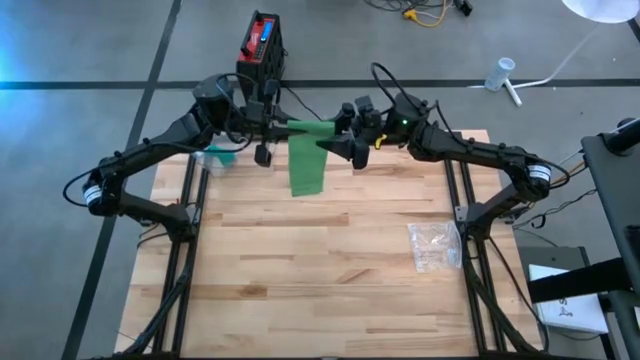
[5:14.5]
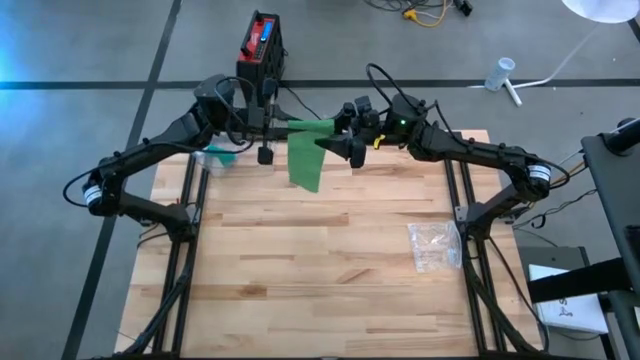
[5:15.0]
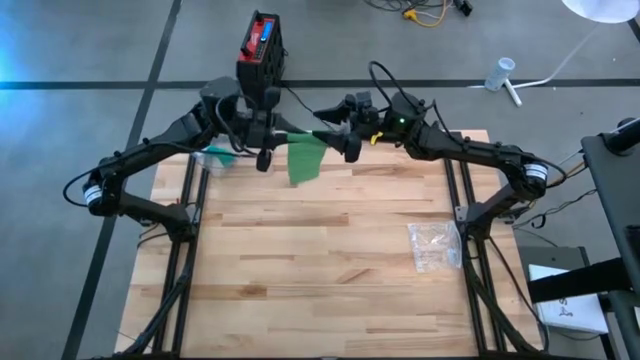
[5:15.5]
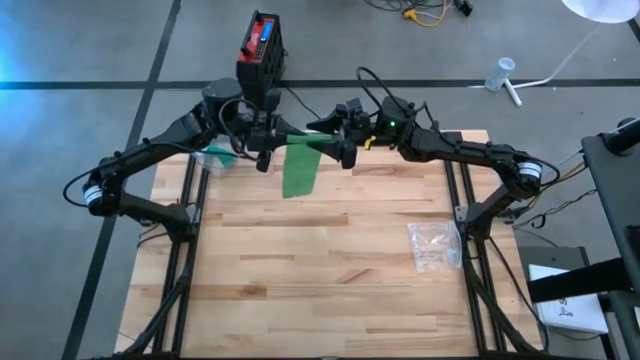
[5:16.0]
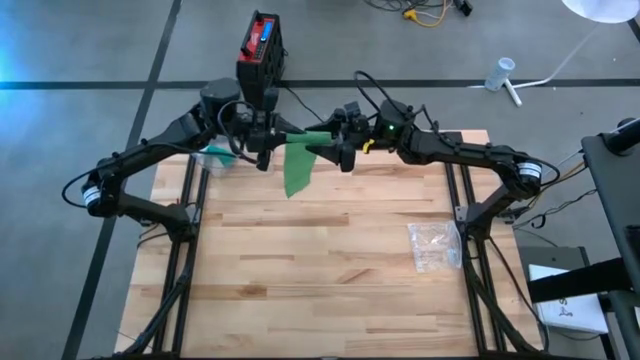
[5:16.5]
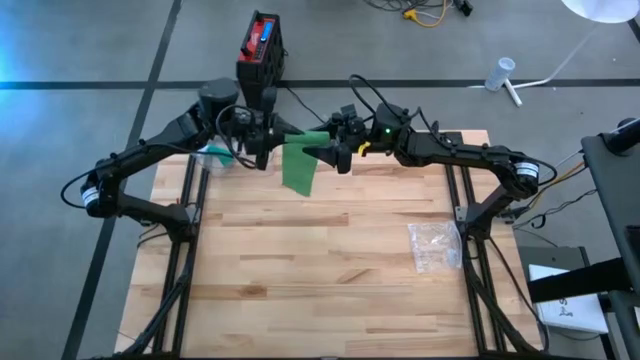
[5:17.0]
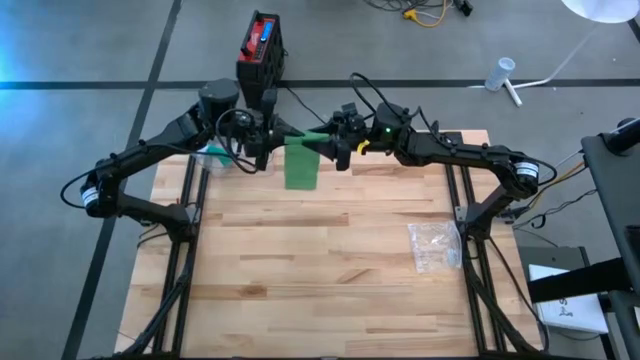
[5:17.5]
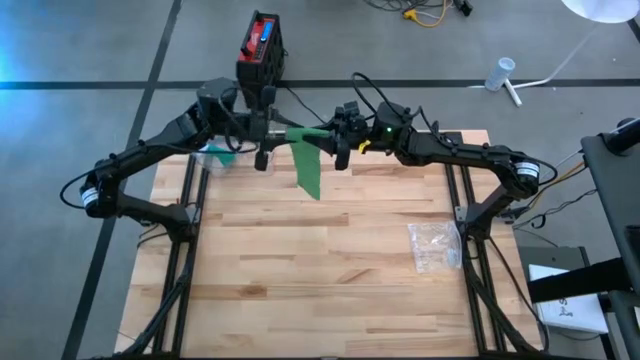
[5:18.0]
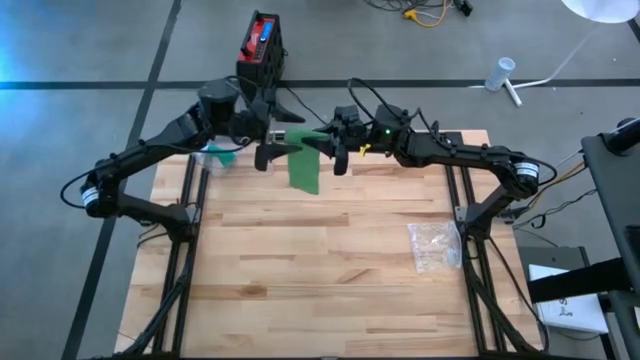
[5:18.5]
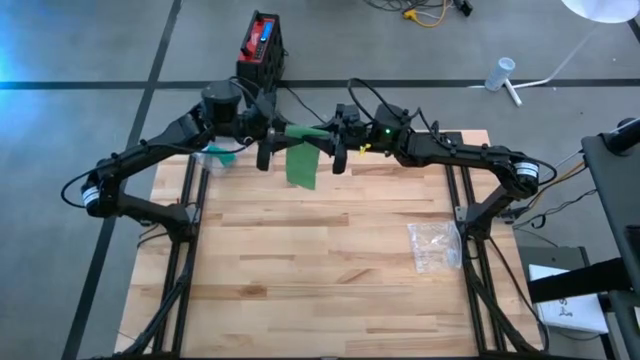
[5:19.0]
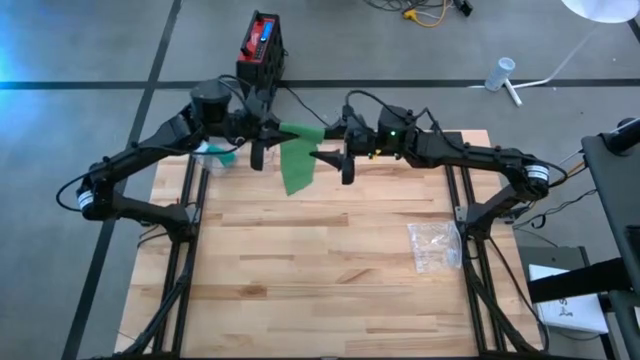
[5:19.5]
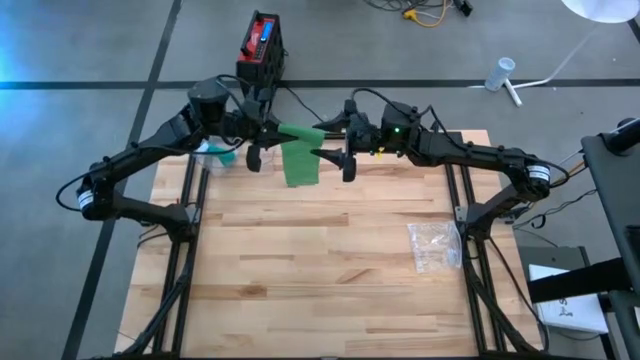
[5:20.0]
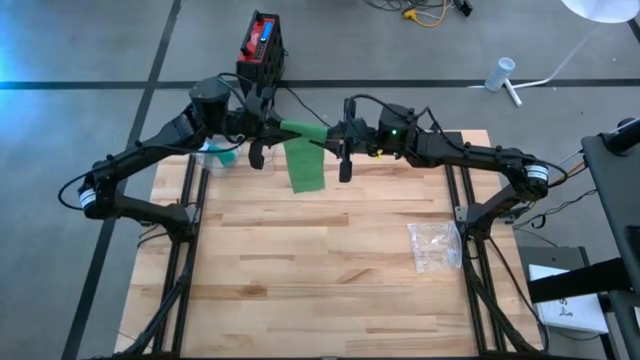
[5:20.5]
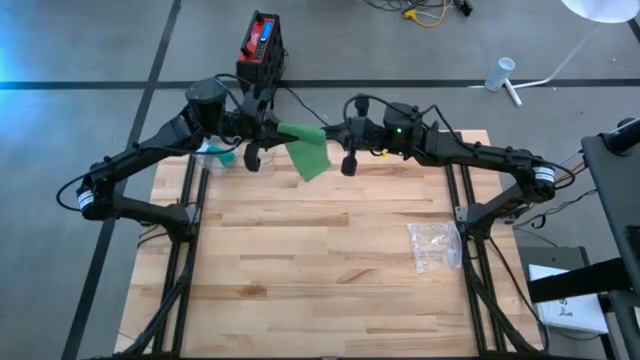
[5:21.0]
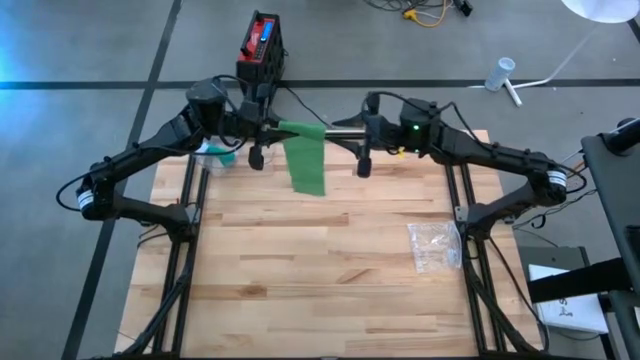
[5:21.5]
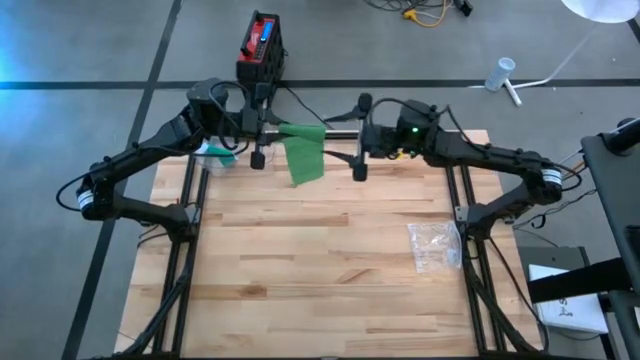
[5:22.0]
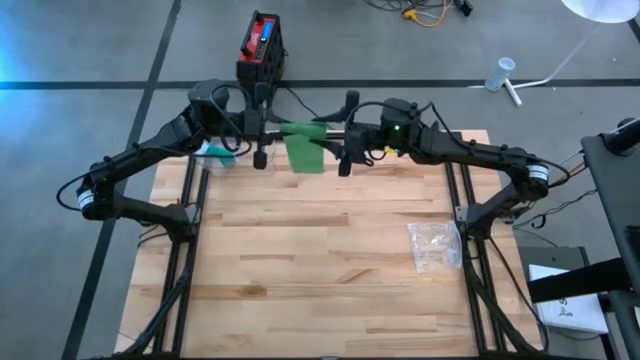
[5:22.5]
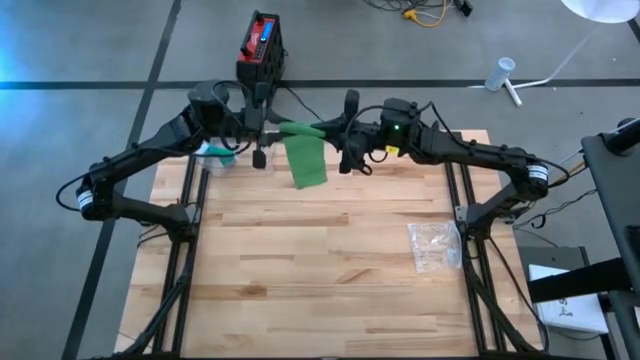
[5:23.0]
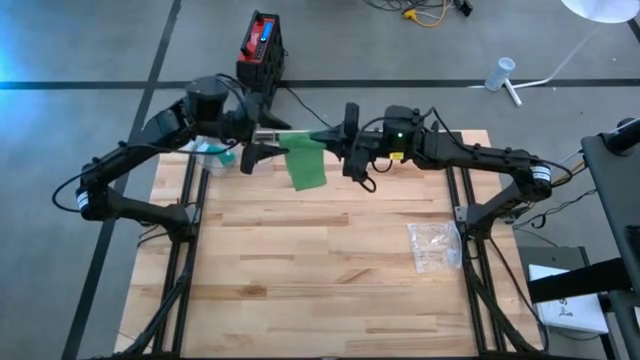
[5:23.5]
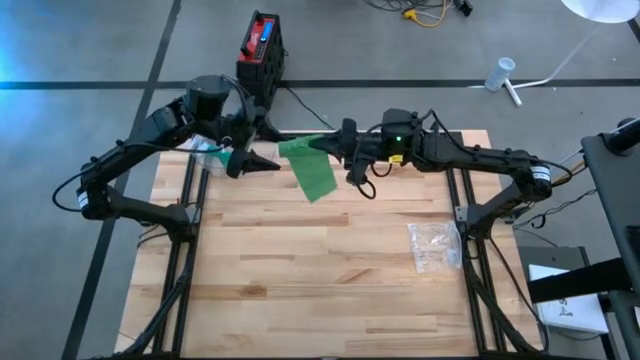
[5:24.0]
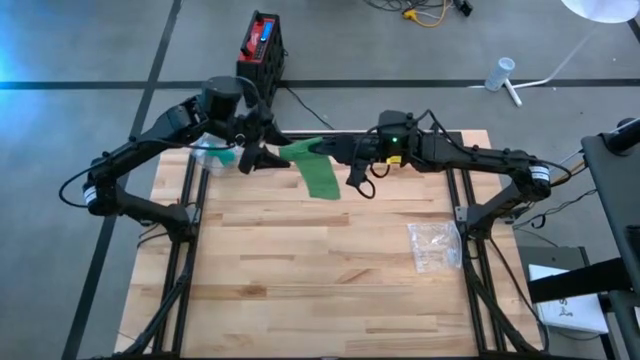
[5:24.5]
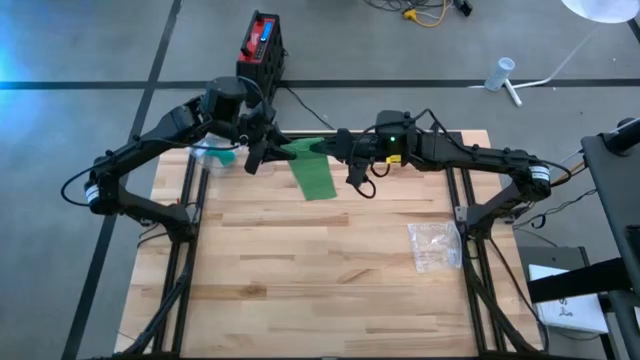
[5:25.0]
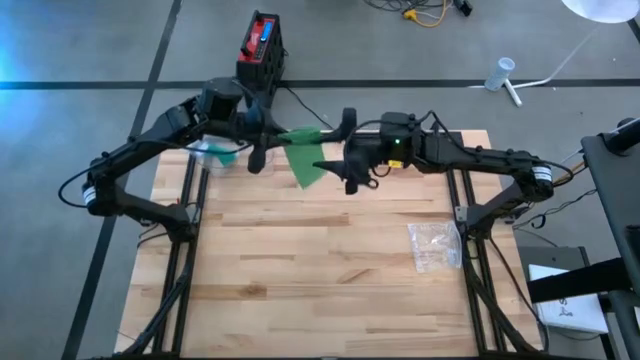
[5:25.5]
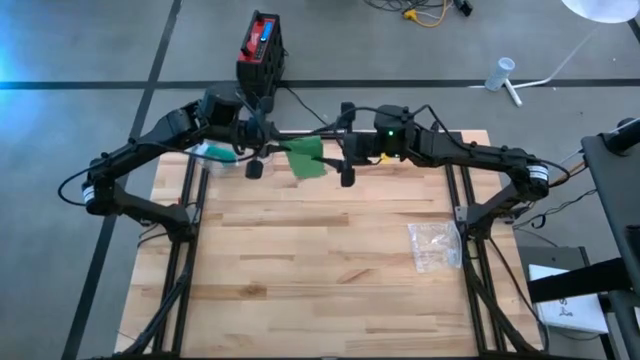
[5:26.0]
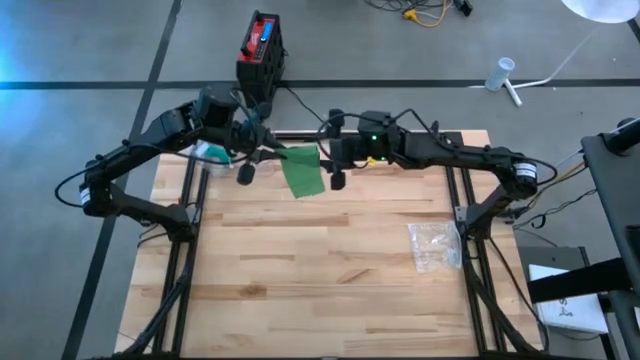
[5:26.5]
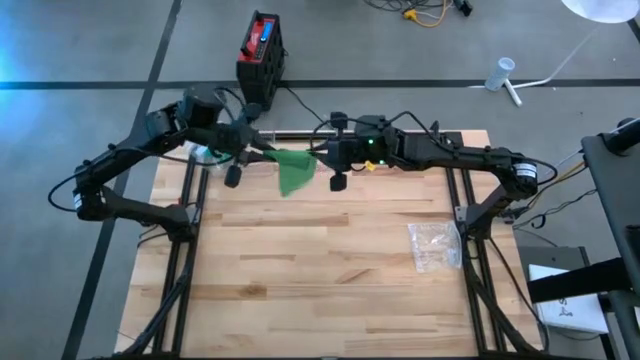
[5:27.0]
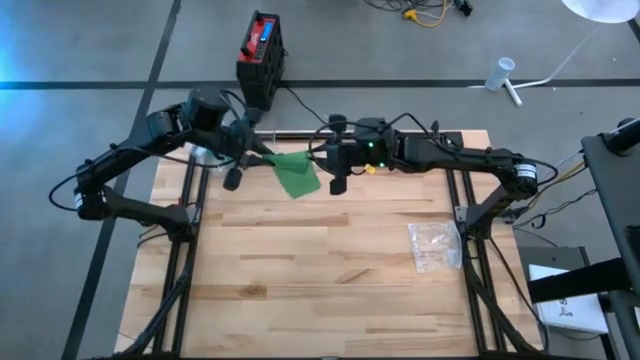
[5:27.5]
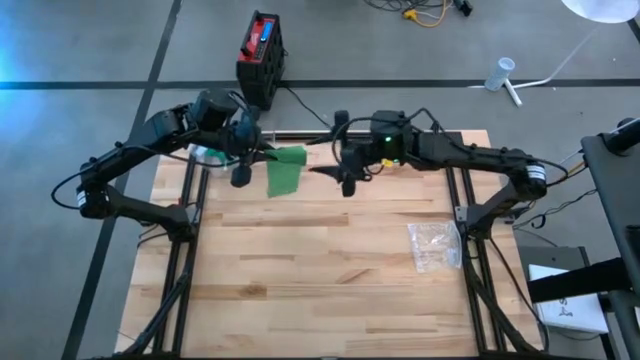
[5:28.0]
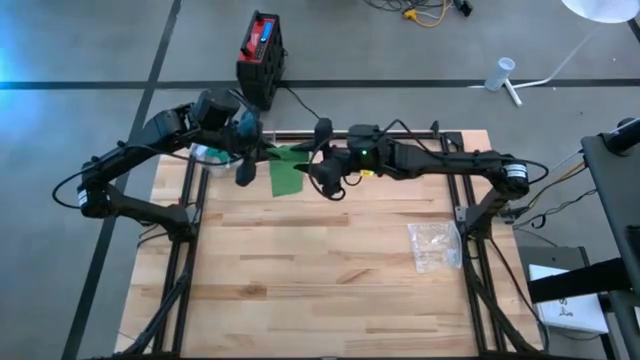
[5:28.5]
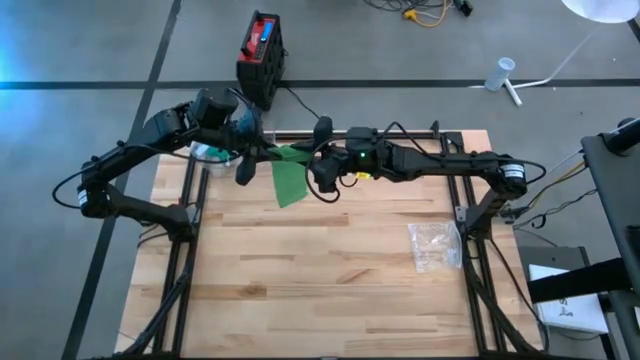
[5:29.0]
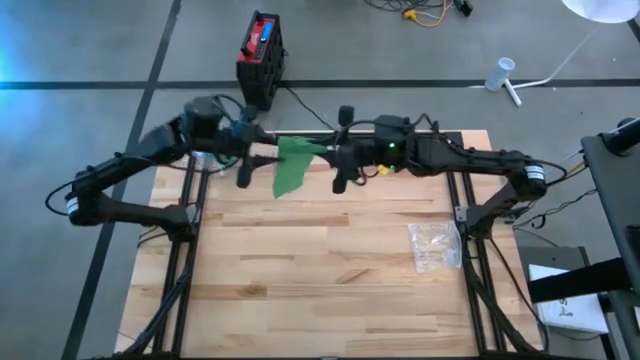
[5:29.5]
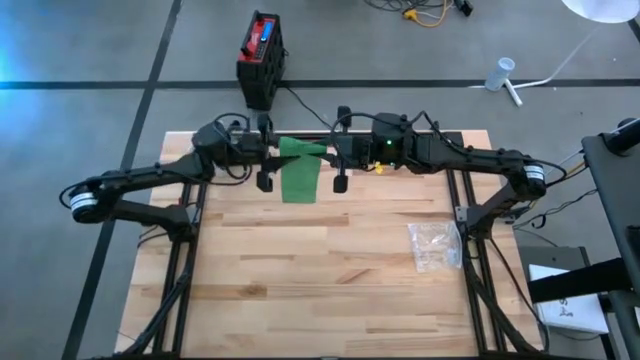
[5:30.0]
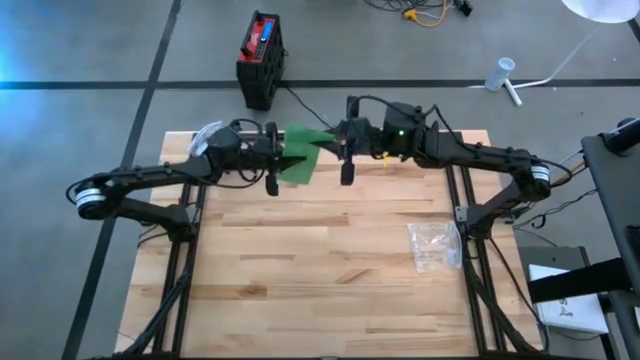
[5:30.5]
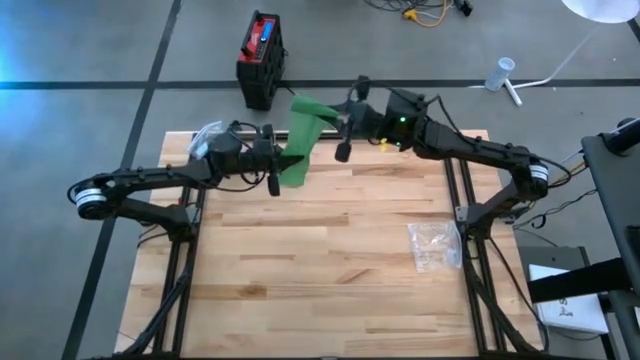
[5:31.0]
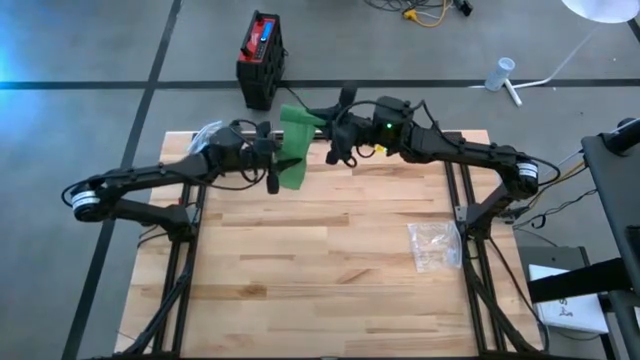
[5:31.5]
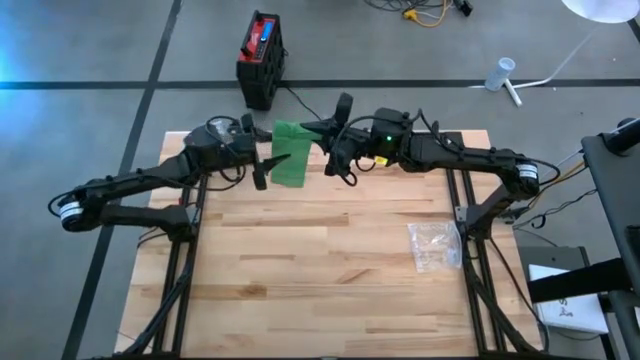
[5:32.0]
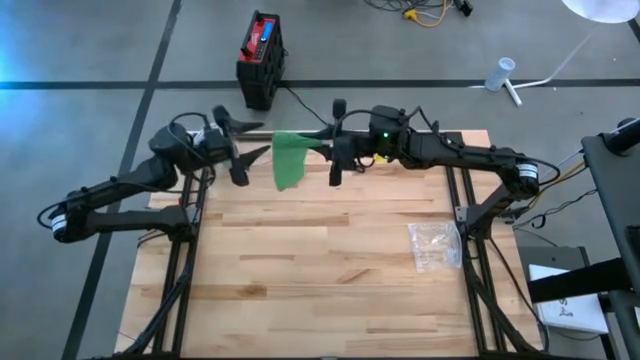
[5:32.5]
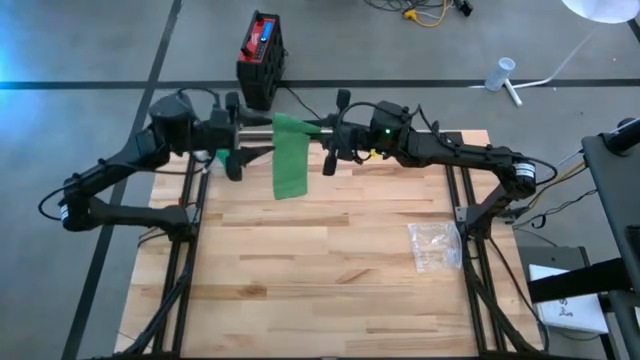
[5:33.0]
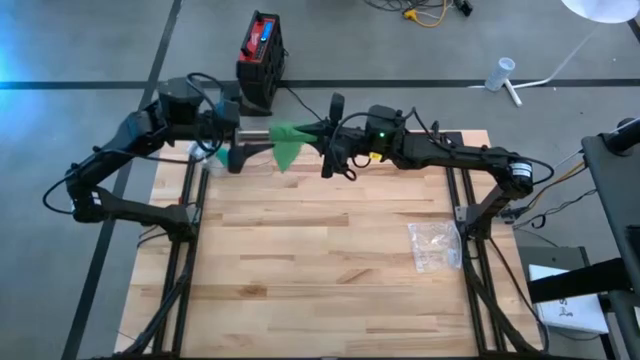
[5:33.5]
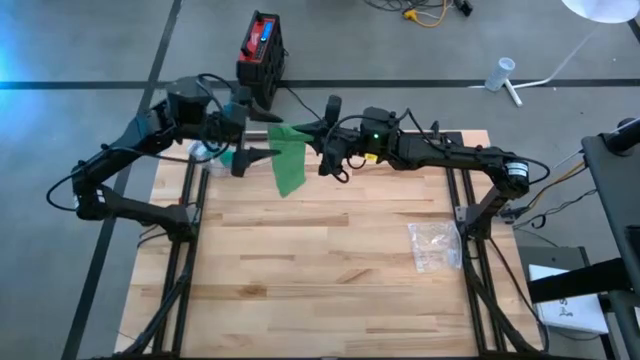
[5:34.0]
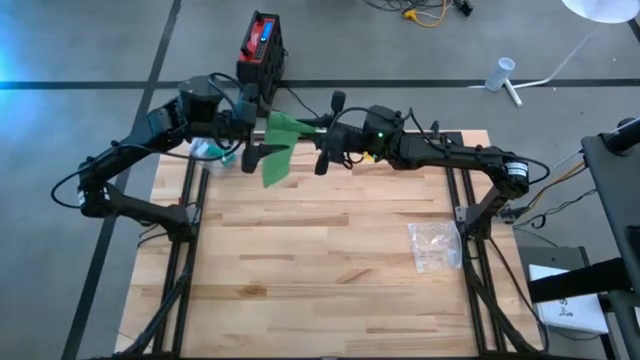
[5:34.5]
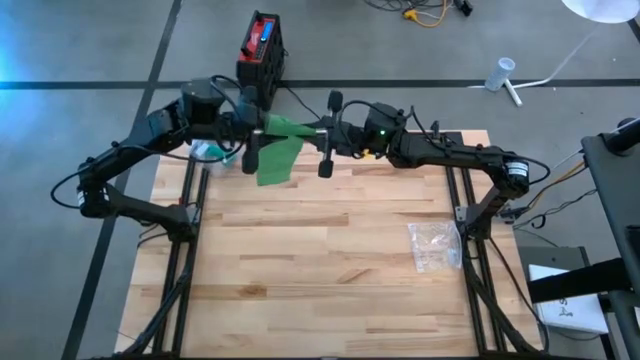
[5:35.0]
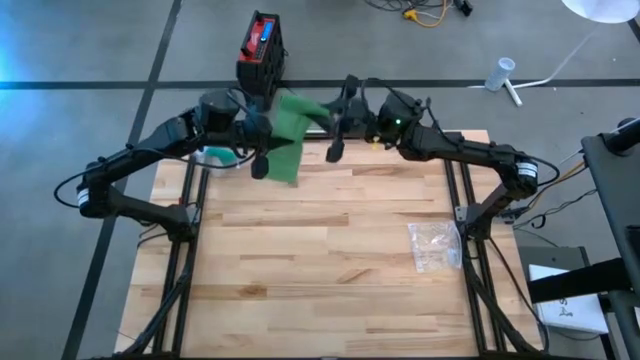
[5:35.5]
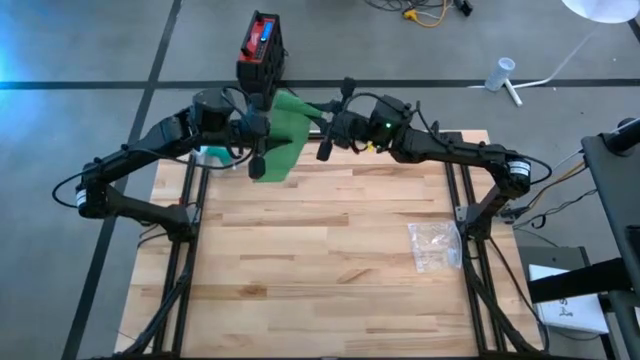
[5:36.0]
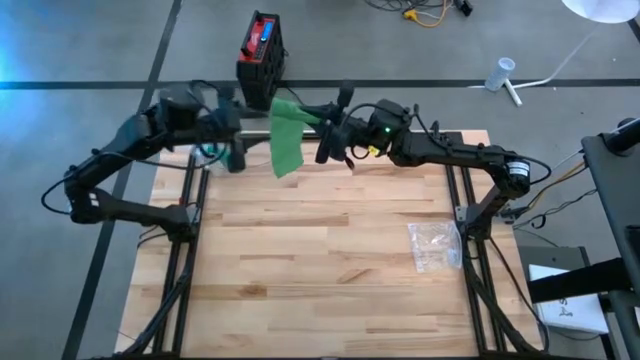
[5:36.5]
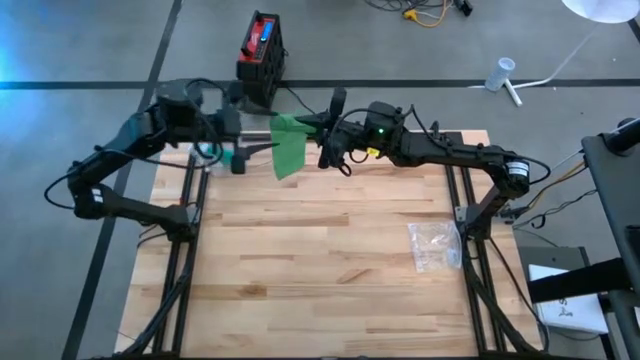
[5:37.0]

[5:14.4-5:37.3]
Task: Roll bandage
Roll the green bandage
